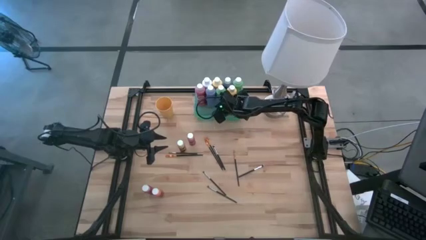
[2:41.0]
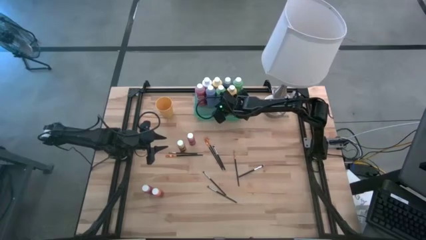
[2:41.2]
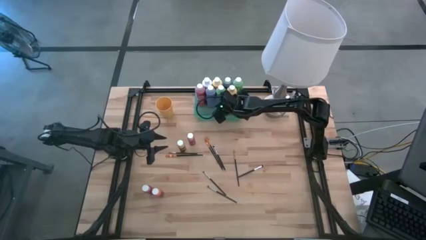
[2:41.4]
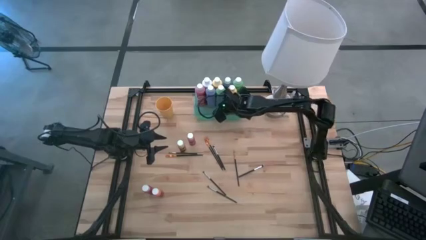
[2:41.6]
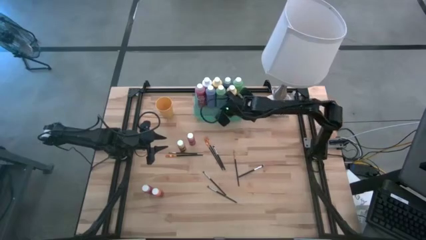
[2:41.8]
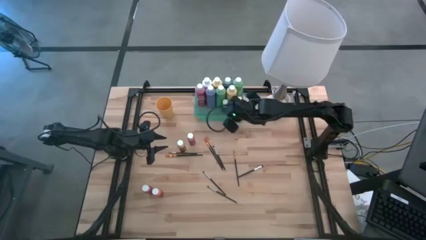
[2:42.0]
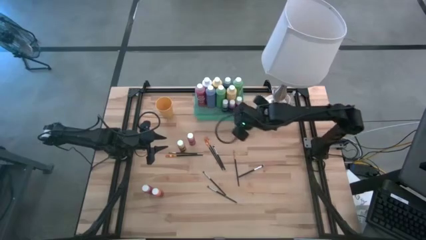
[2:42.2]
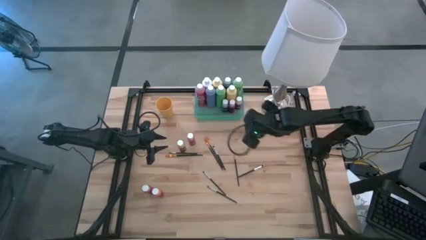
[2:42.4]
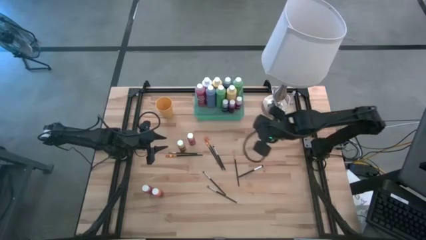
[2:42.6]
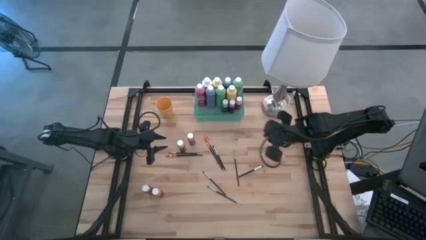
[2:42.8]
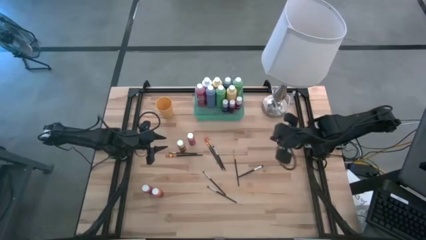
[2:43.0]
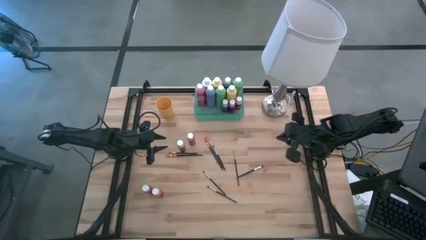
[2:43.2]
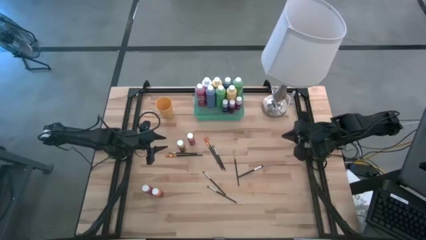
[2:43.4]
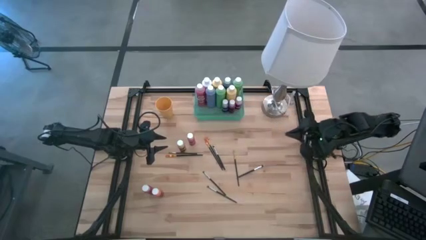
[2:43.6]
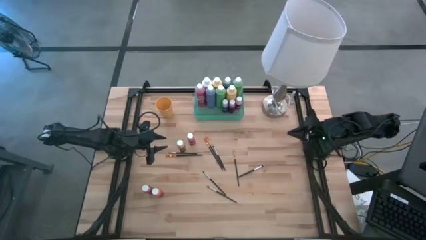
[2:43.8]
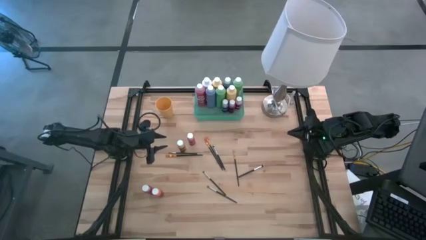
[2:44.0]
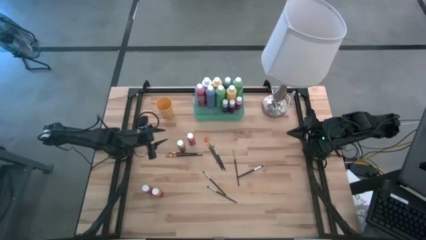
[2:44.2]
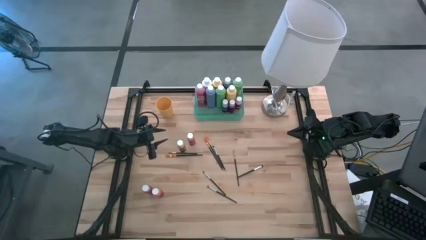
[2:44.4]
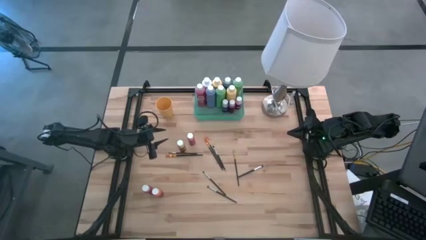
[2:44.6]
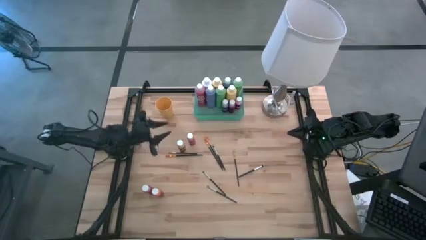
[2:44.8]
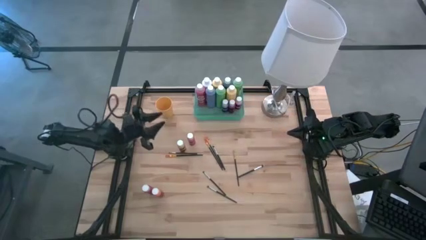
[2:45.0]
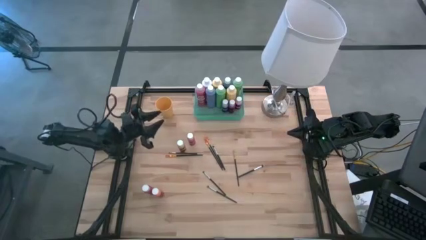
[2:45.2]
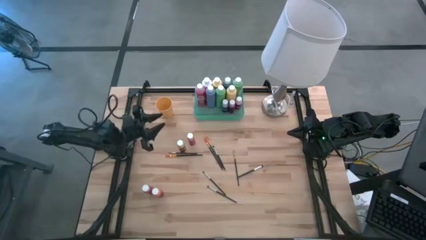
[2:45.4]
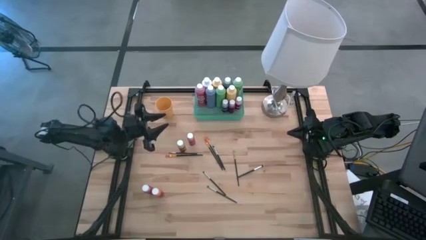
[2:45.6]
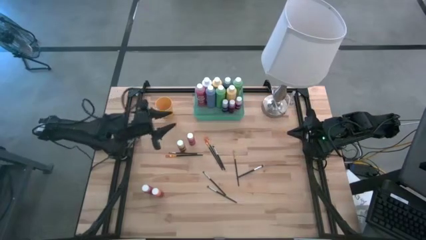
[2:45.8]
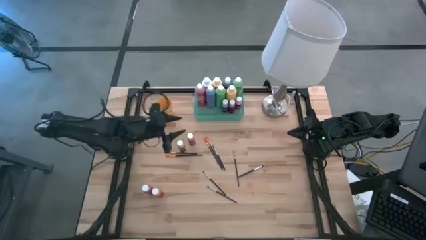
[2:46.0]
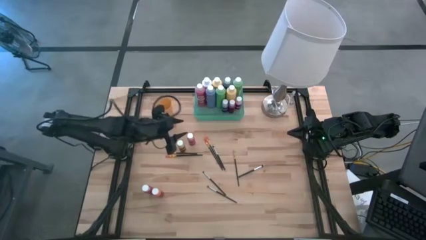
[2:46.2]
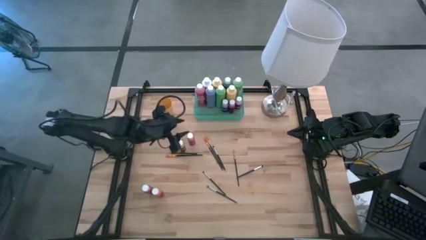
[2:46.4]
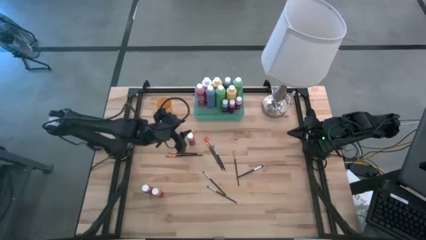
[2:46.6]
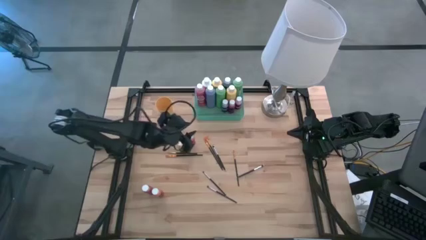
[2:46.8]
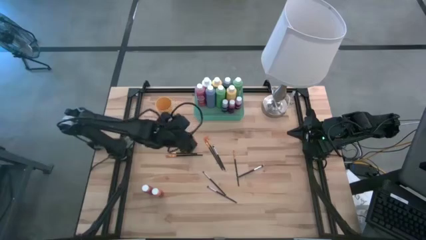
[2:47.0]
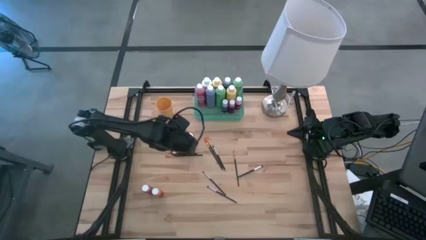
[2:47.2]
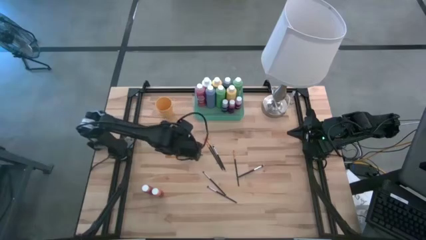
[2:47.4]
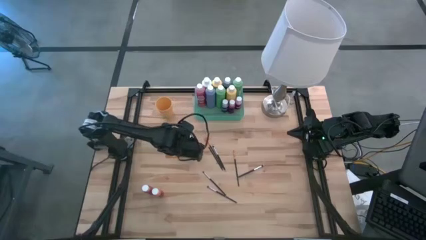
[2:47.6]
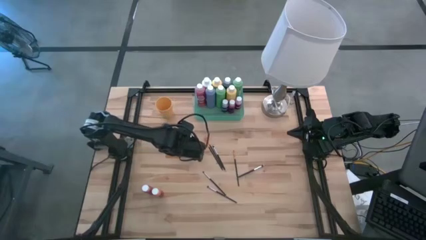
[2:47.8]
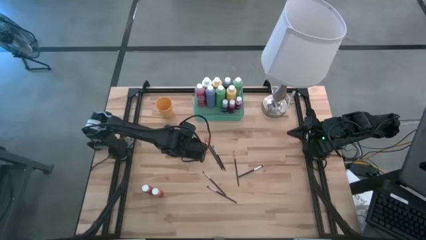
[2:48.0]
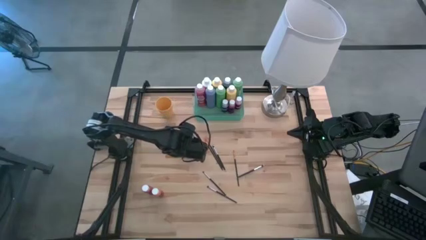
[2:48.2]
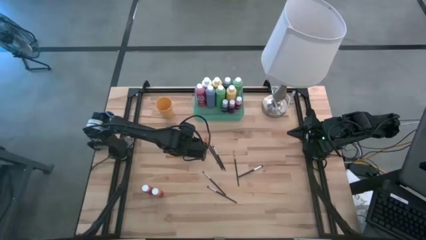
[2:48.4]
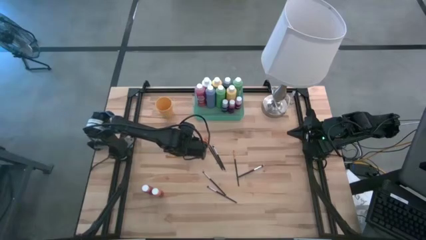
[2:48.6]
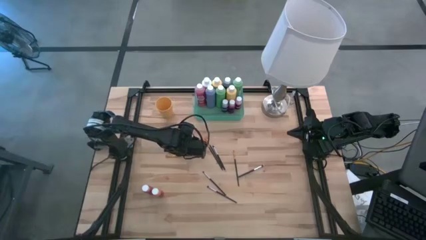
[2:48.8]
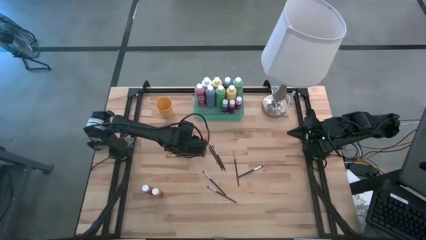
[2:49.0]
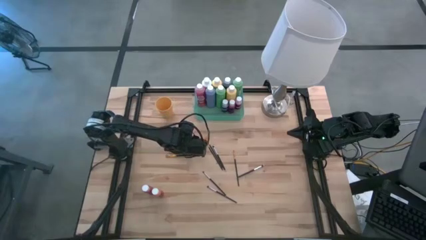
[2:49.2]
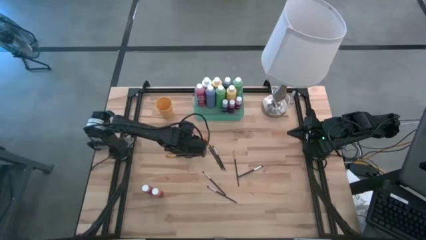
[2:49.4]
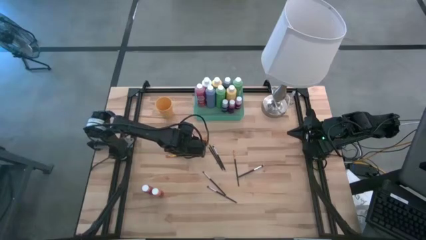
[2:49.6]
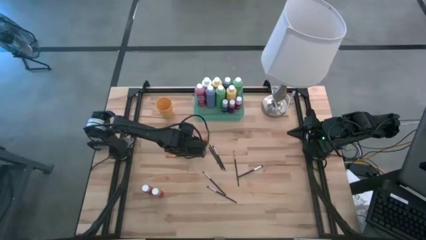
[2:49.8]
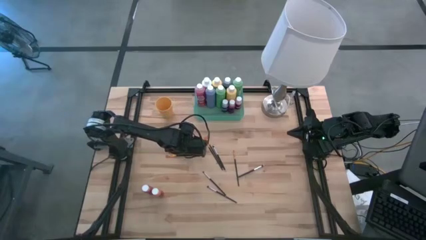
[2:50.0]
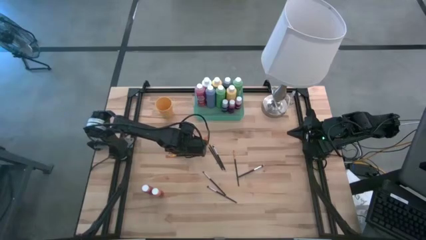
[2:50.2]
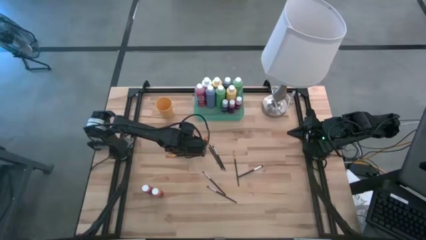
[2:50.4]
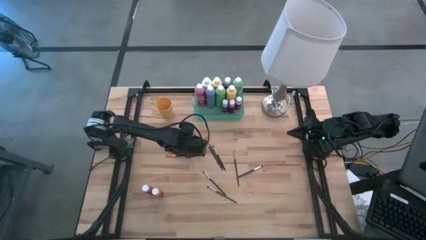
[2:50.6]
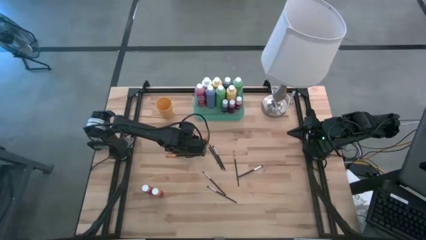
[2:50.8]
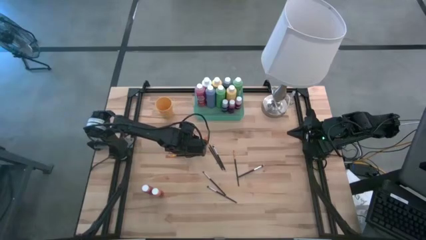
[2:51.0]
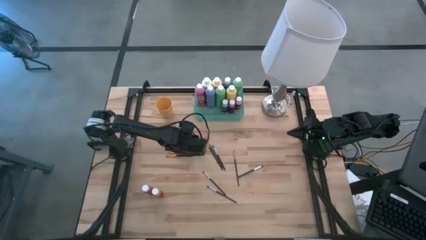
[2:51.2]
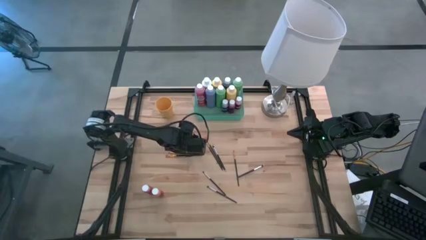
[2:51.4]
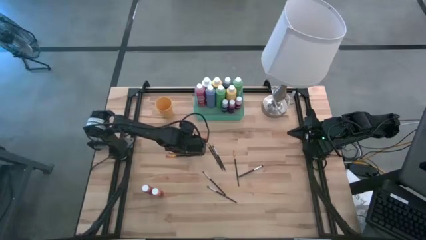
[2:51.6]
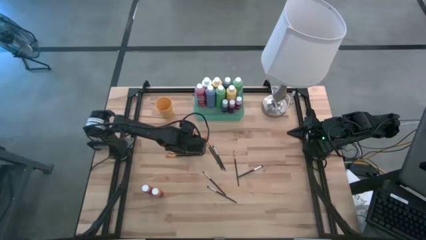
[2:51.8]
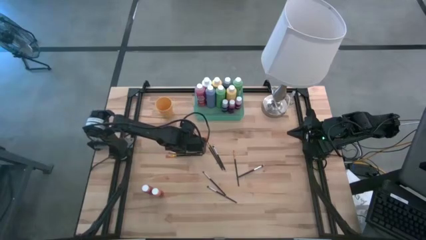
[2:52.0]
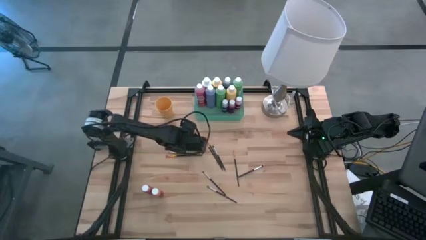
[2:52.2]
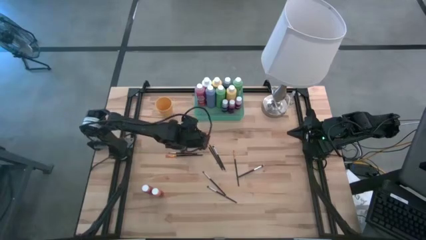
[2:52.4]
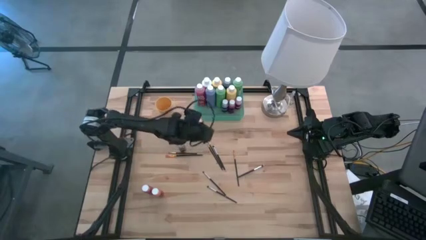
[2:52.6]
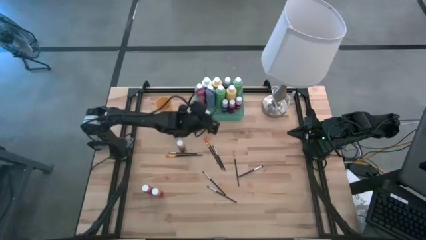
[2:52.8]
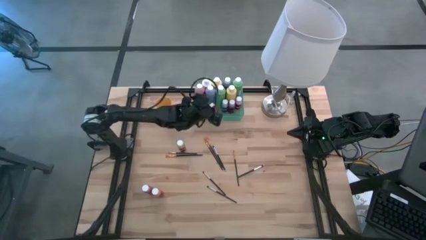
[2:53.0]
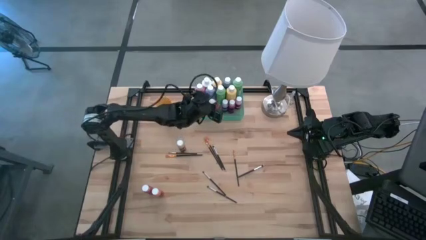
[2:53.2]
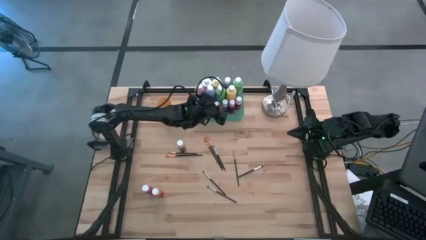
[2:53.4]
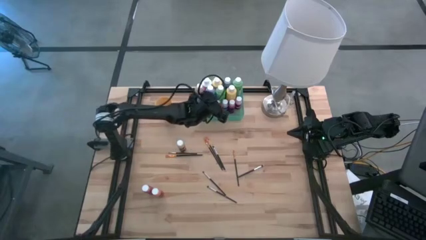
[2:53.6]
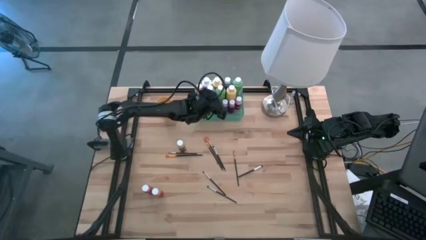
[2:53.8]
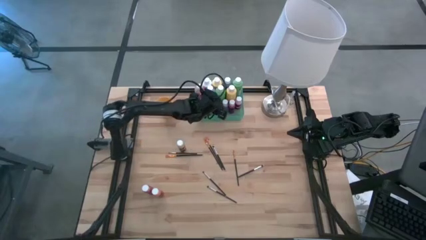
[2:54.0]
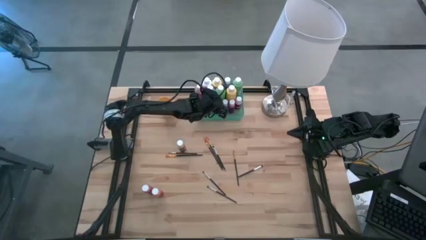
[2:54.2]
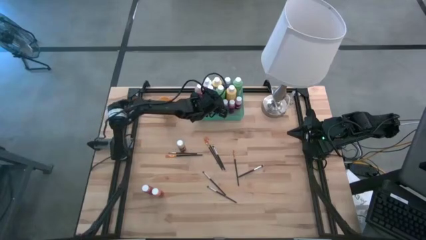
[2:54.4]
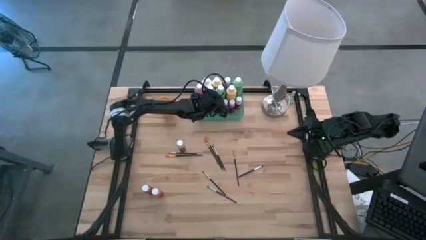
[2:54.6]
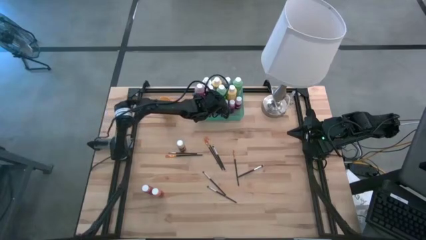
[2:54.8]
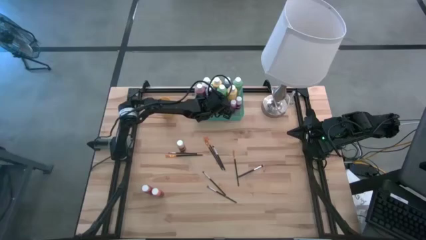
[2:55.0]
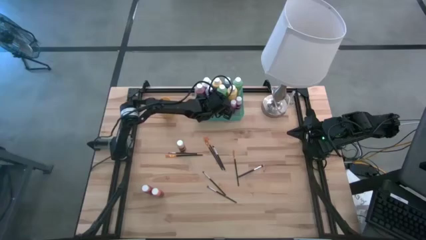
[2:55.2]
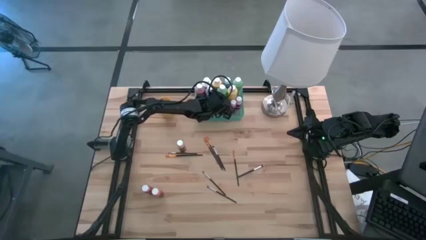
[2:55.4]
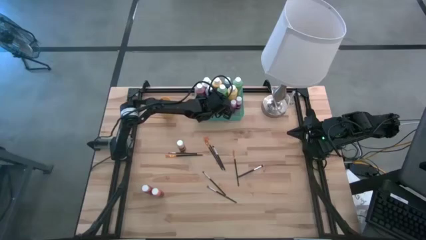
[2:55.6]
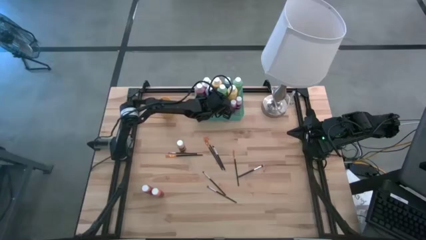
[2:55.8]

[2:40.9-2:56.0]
Task: Pick & Place Paint Supplies
Put the small orange paint bottle into the green bin

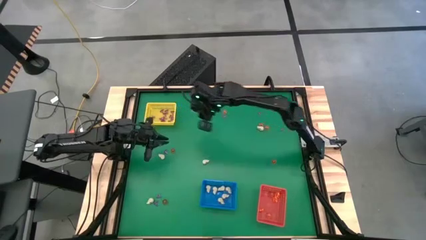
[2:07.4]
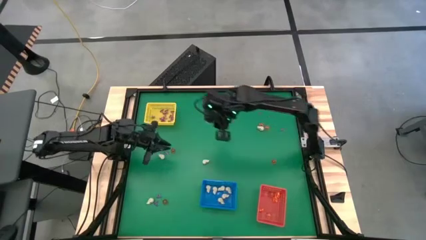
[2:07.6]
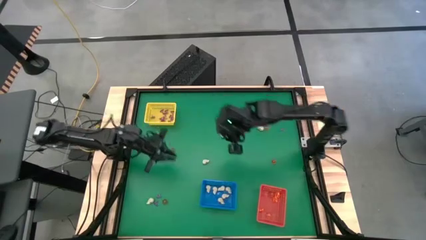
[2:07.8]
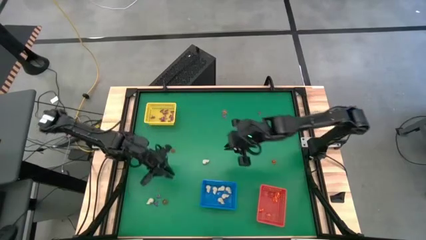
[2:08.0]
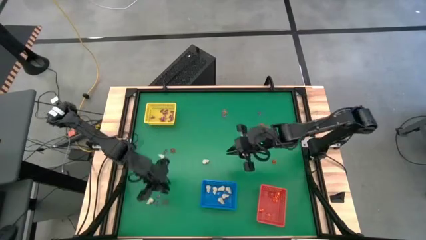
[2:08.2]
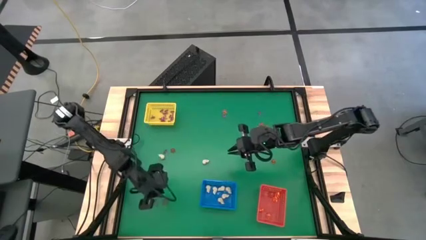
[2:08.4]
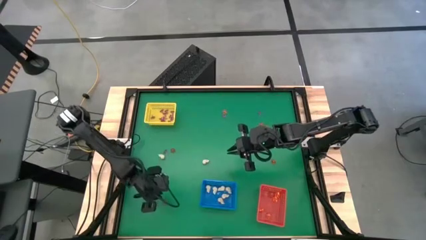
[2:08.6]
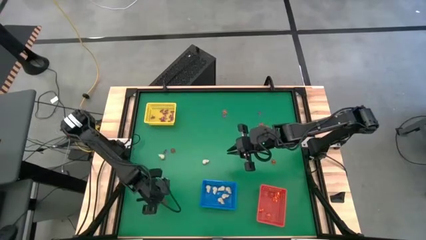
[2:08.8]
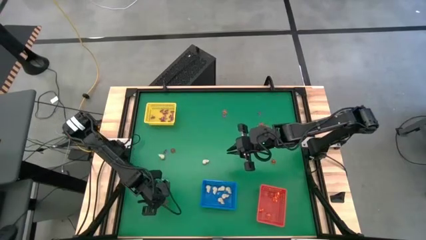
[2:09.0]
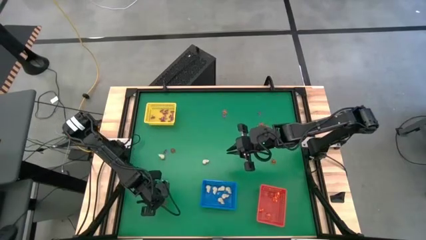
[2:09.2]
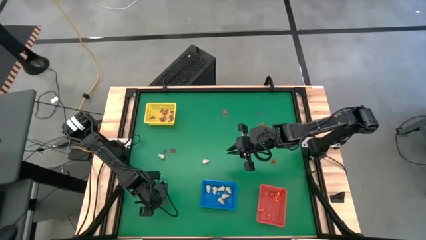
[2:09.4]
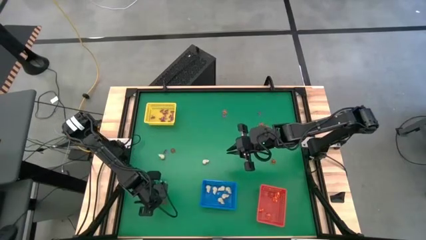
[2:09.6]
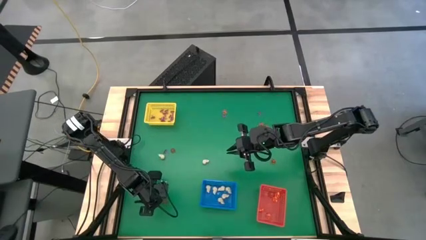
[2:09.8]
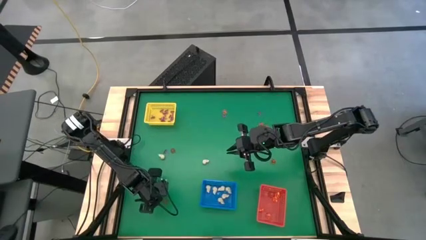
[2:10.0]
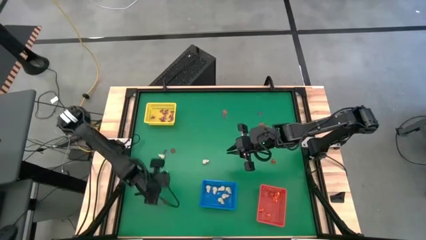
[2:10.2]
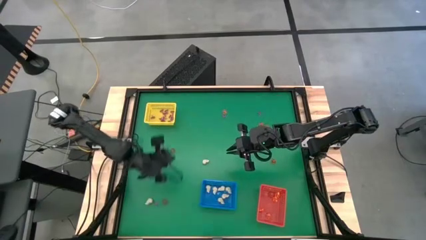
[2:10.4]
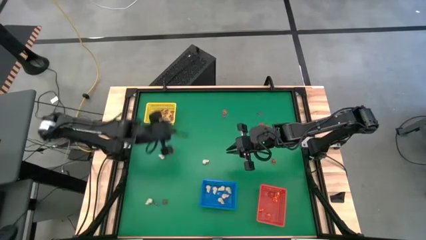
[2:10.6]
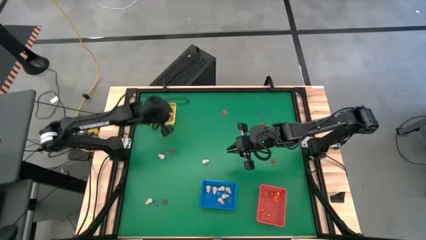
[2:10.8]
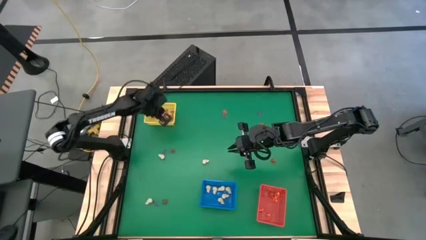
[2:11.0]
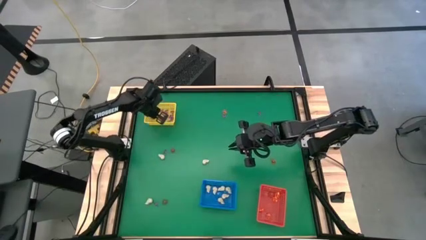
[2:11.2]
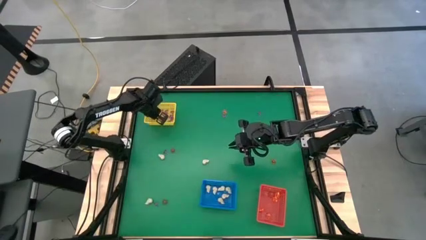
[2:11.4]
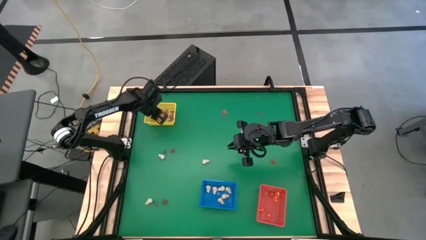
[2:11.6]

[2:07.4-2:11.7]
Task: Sort Halloween decoration
Put the purple witch hat toy into the yellow basket
